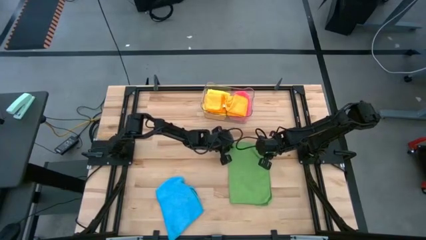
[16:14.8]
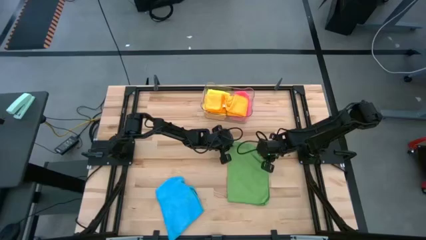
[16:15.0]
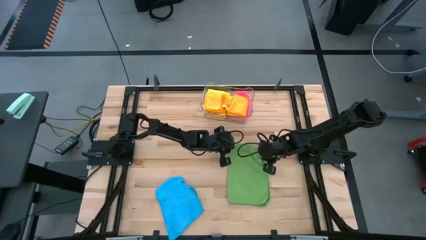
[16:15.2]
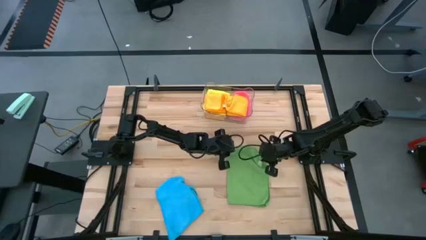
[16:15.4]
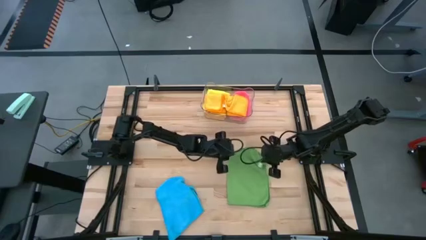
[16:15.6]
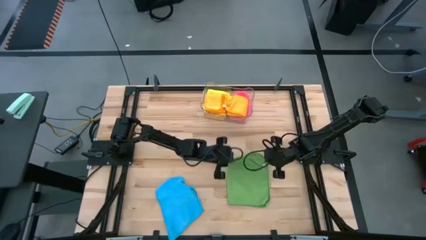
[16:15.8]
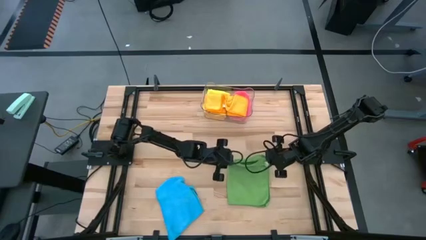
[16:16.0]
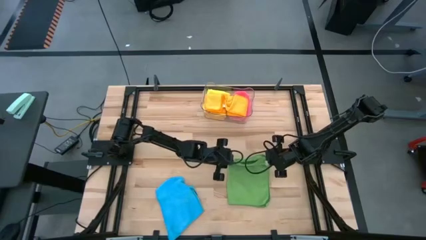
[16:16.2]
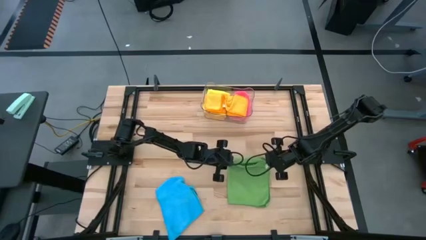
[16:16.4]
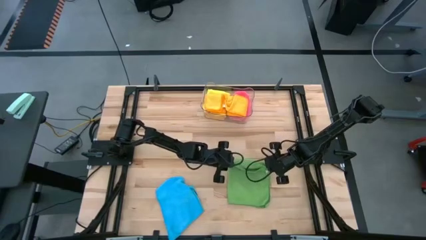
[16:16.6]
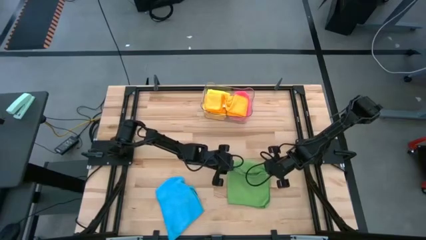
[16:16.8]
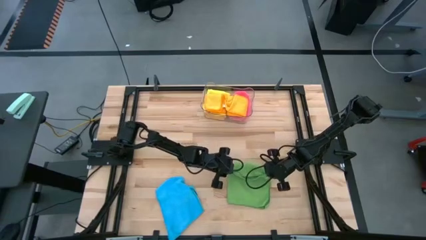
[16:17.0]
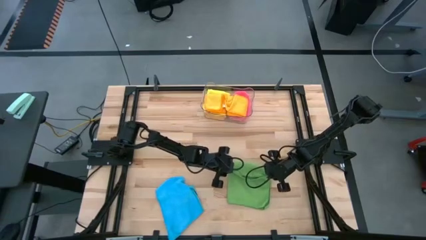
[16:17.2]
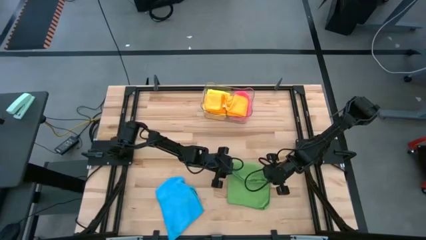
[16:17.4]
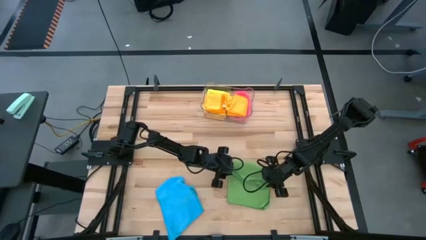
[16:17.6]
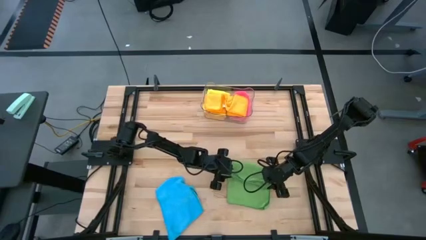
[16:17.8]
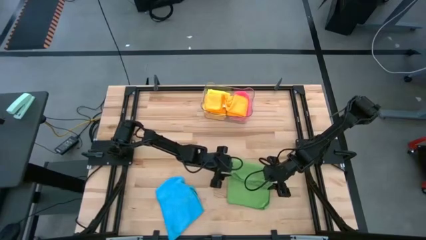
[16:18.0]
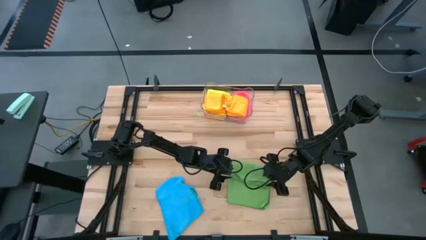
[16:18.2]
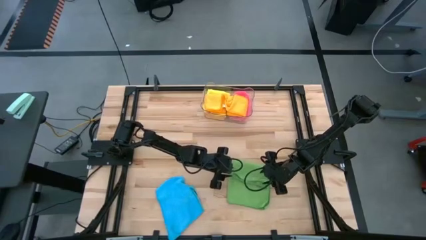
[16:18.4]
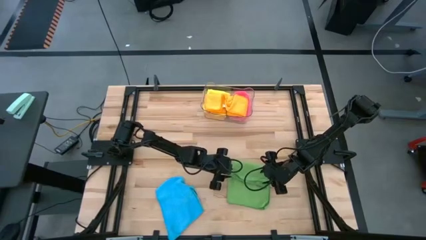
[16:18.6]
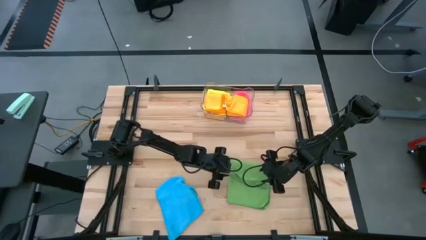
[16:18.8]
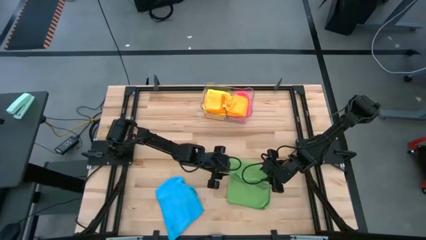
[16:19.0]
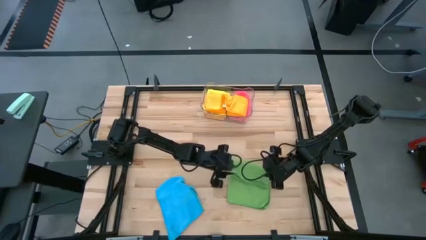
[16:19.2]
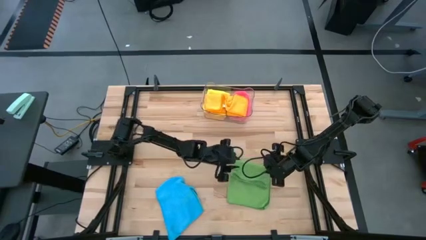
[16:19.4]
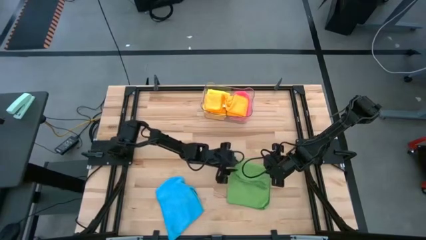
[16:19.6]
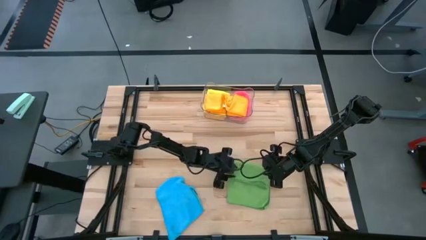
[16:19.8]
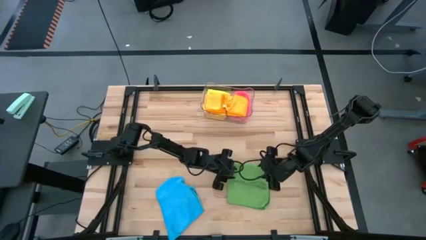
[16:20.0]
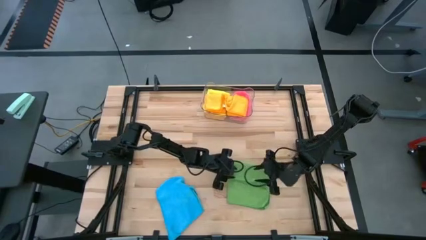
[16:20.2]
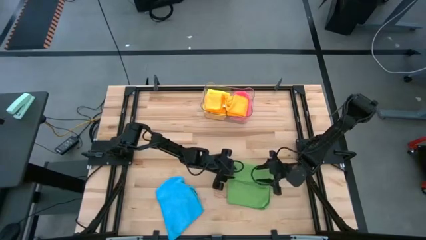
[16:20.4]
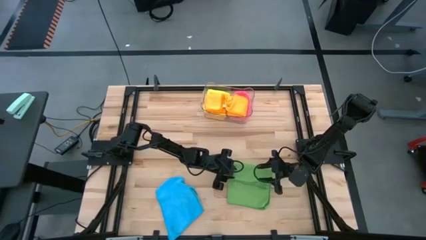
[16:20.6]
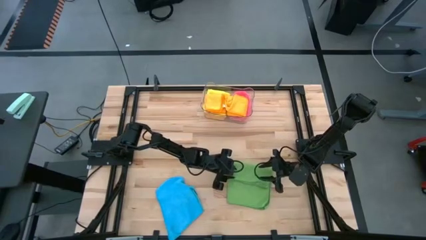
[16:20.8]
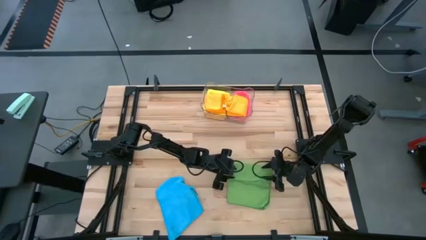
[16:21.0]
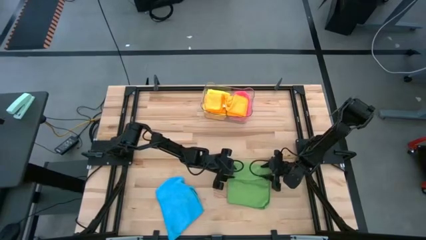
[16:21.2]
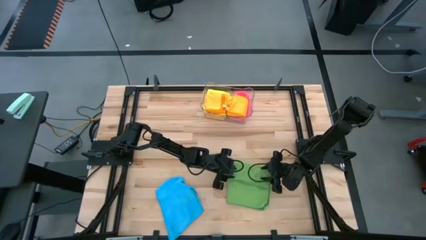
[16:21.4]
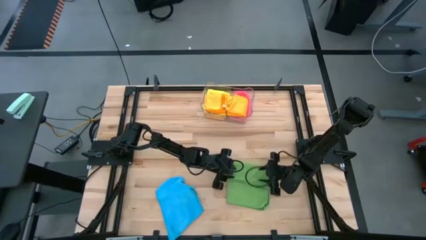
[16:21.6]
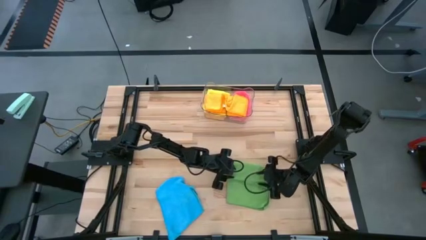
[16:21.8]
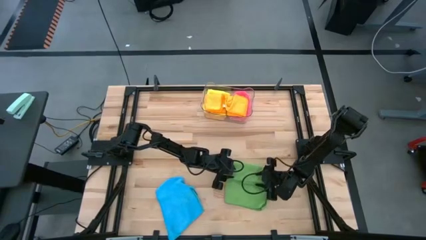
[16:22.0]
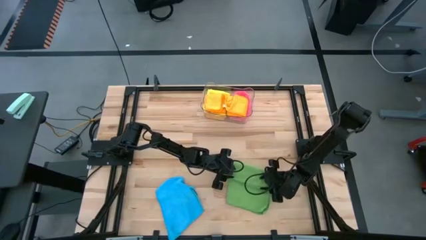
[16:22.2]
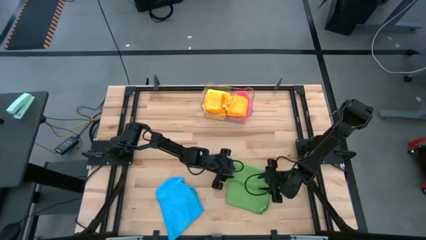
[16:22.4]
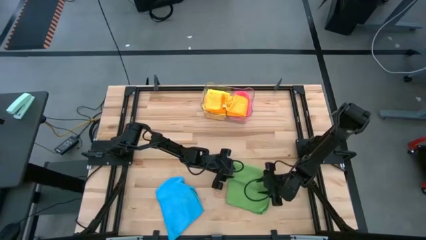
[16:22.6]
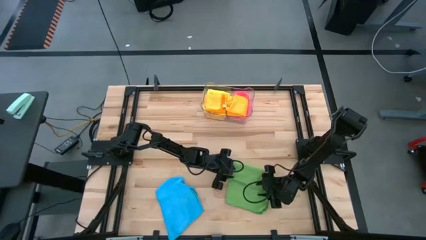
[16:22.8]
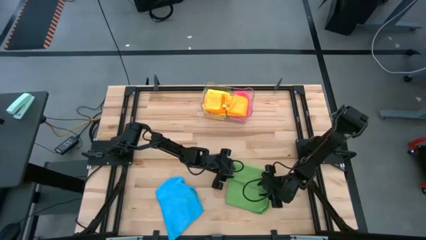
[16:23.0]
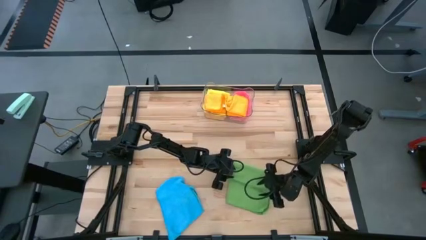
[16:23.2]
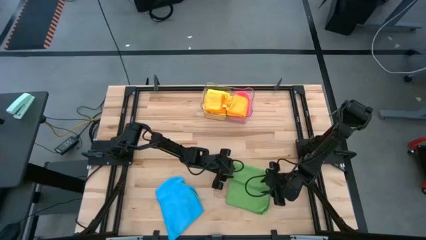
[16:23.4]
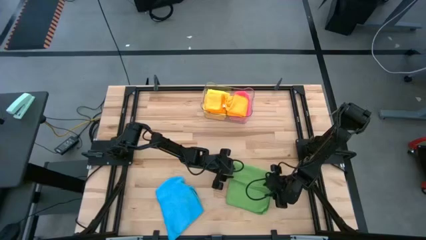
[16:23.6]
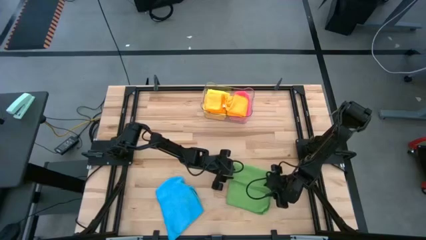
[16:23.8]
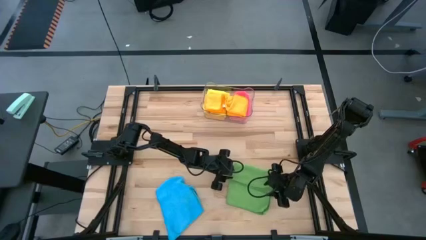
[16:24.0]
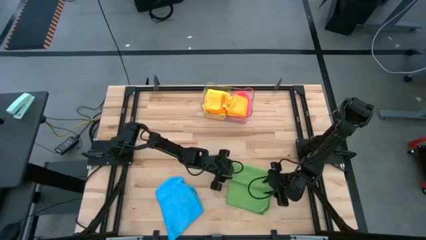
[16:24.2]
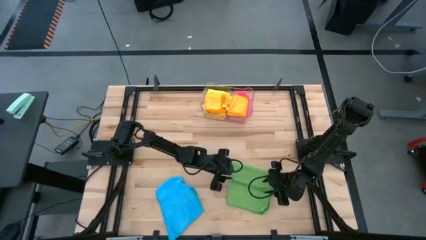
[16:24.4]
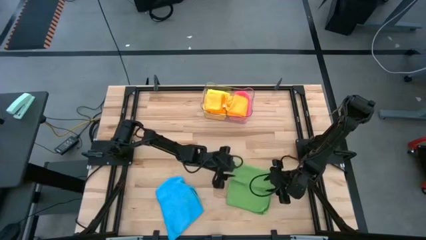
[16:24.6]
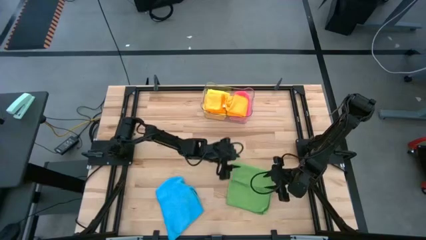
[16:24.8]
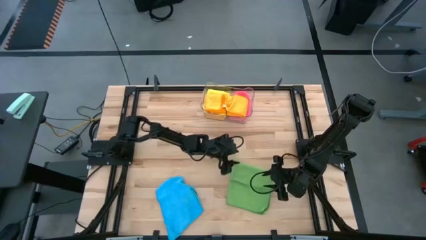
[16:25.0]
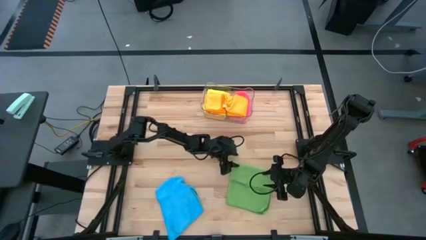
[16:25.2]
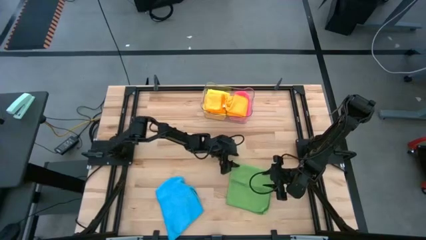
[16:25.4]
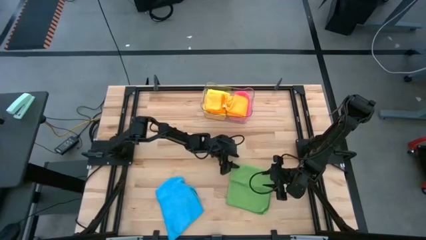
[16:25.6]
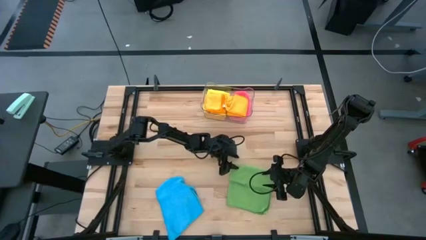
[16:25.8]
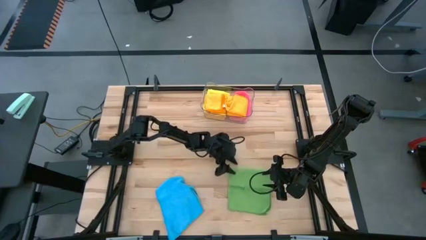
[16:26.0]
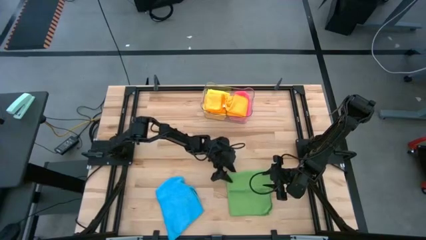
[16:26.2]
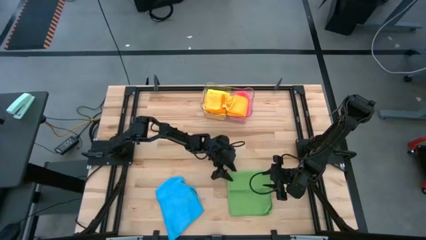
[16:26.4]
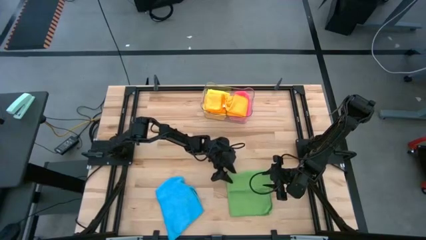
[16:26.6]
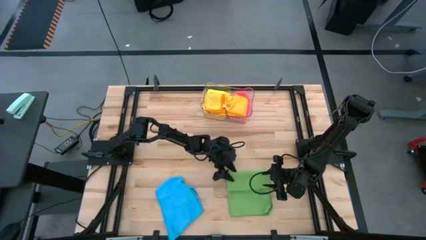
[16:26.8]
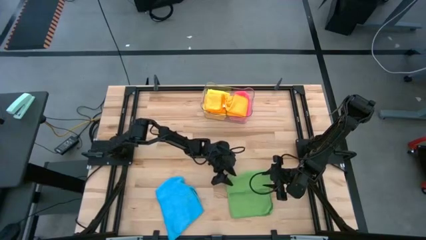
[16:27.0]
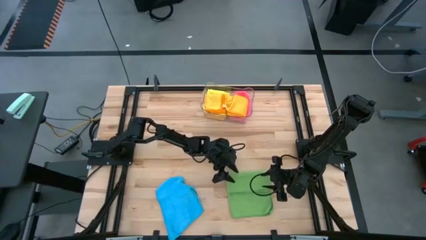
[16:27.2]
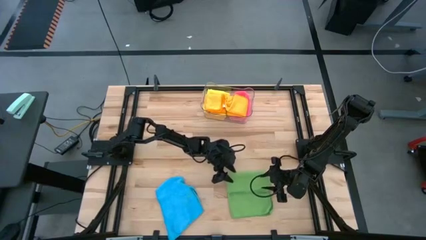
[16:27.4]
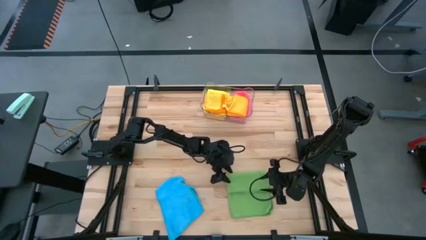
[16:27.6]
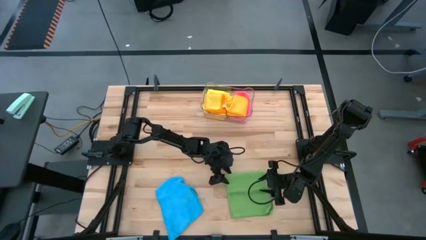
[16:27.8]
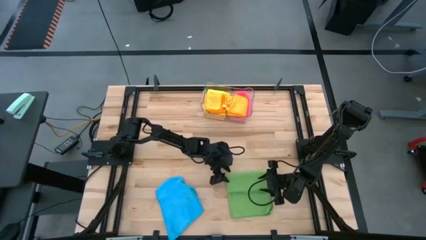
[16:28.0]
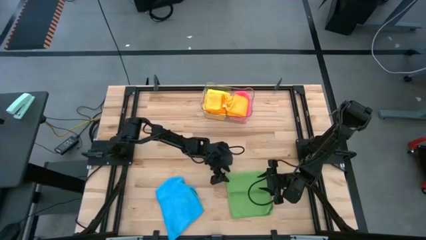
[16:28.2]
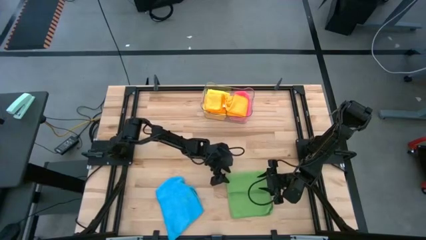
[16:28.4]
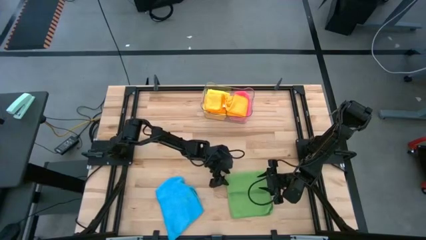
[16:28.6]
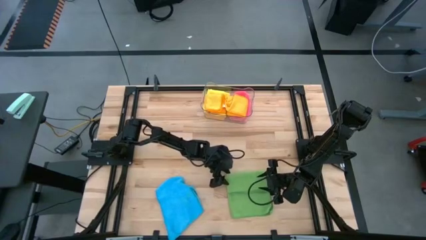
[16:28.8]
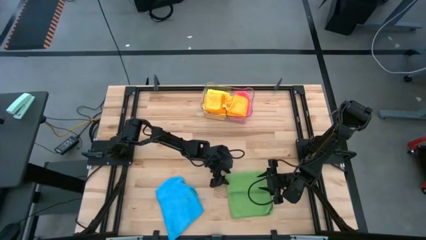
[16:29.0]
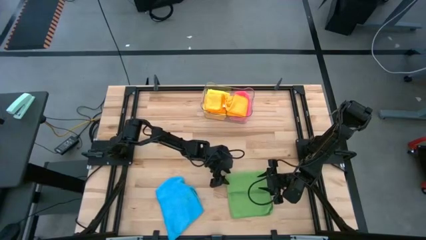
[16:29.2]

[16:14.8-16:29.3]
Task: Fold microfiber towels
Fold the green microfiber cloth

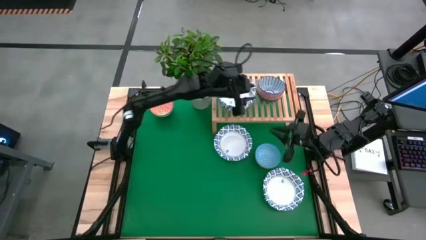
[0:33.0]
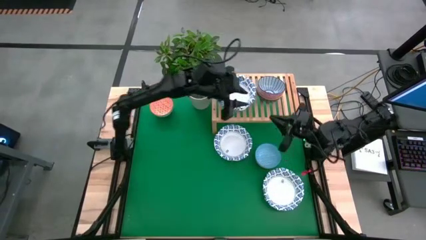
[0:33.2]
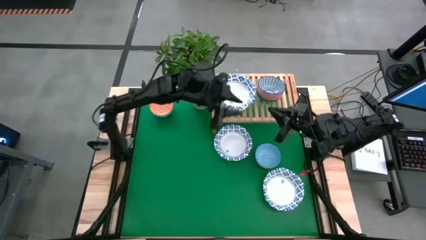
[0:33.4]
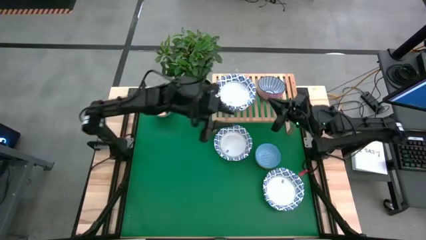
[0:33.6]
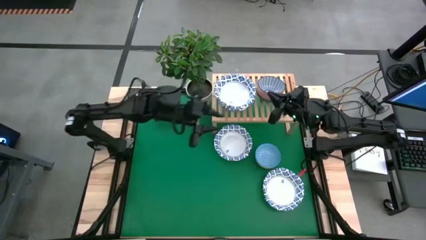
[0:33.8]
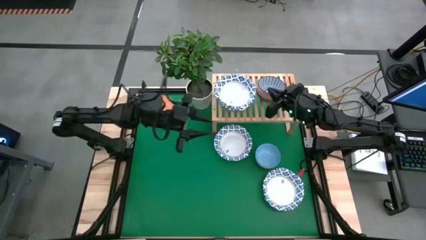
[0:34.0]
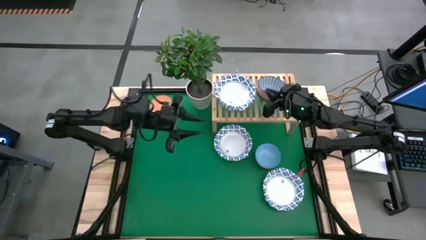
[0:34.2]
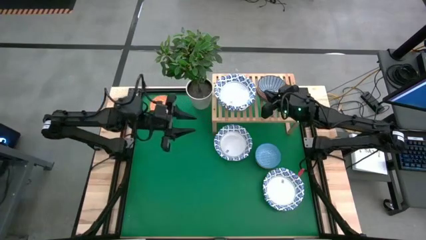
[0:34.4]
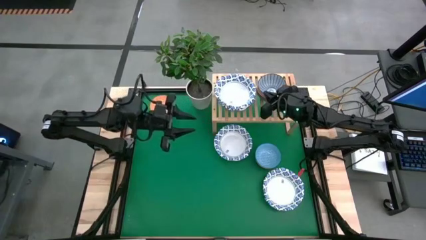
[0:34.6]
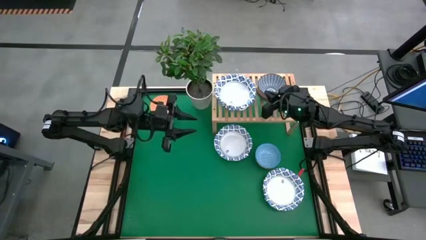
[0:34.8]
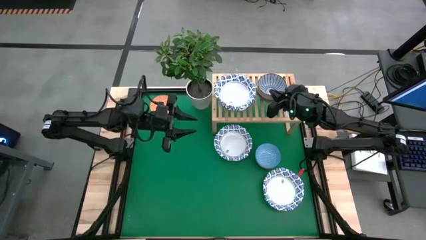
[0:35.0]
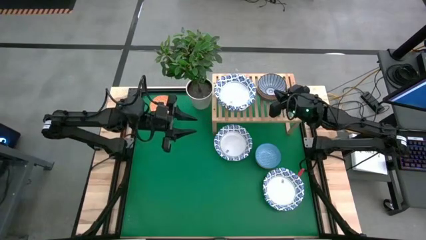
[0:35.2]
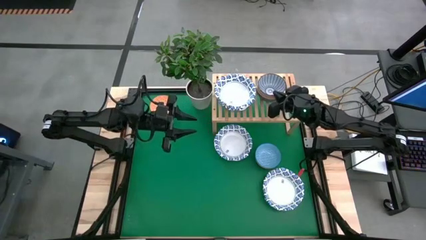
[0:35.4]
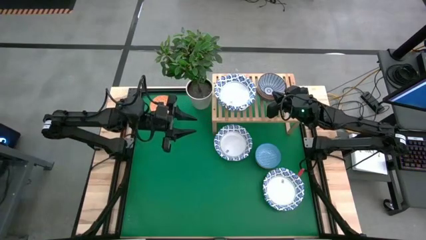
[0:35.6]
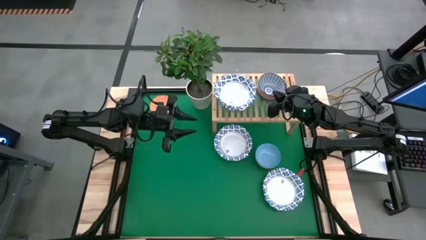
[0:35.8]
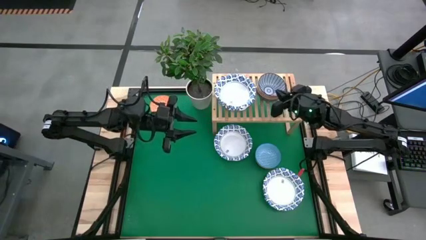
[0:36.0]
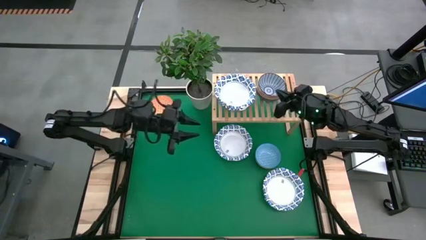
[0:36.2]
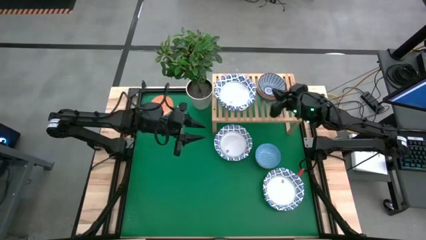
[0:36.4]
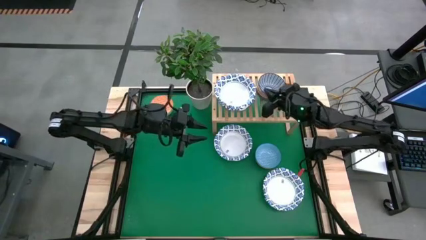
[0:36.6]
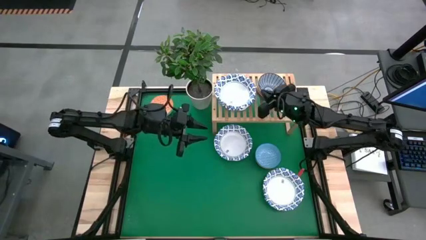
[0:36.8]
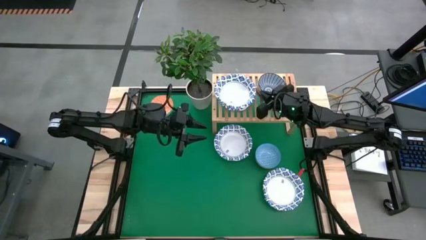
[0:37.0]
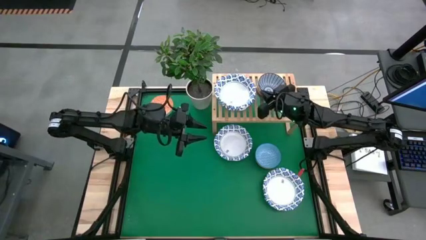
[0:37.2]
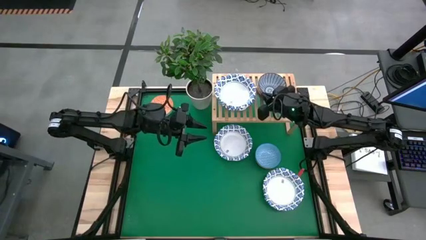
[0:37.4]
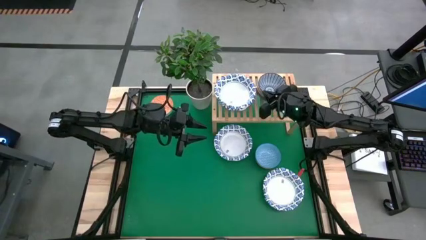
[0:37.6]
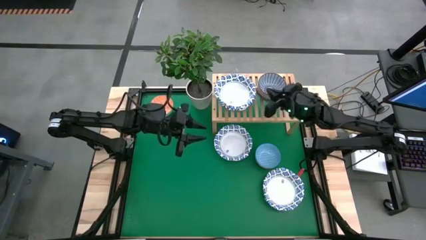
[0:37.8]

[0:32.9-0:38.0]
Task: Place and stack bowls onto a shelf
Adjust the blue bowl
